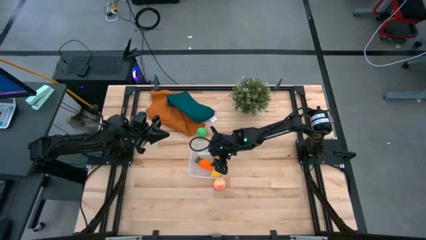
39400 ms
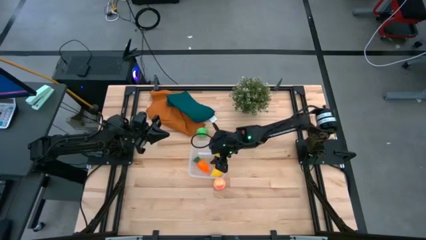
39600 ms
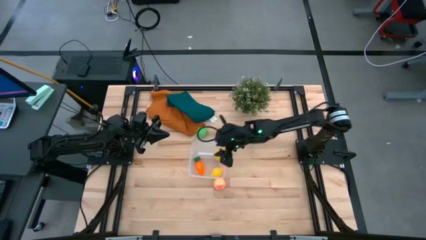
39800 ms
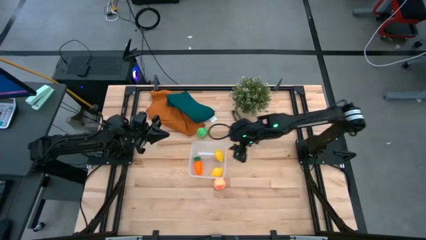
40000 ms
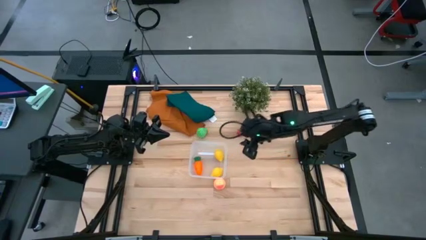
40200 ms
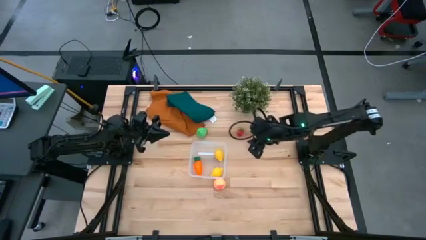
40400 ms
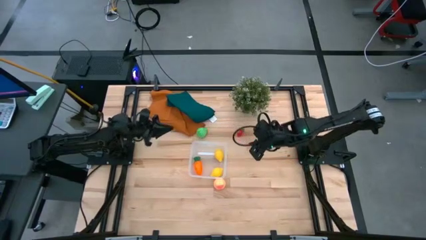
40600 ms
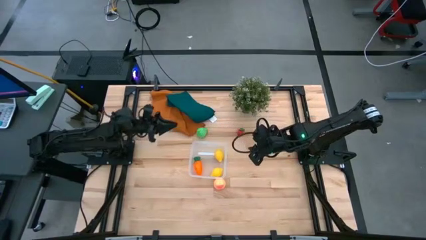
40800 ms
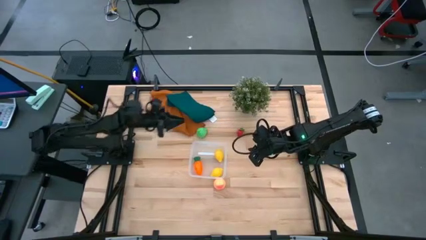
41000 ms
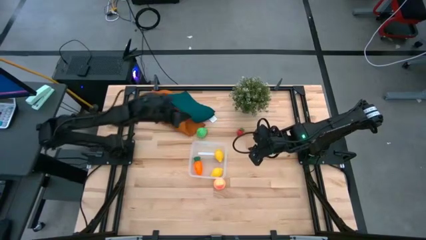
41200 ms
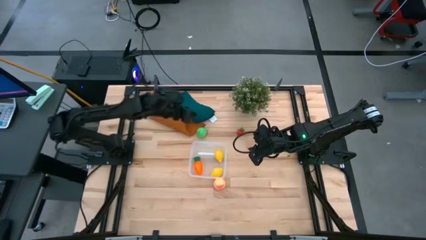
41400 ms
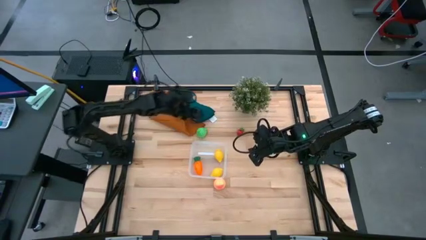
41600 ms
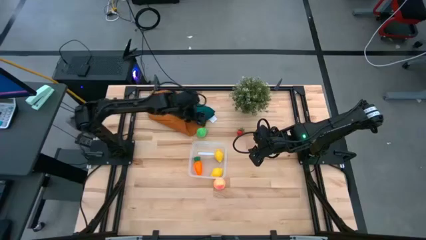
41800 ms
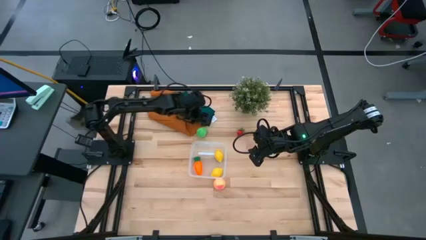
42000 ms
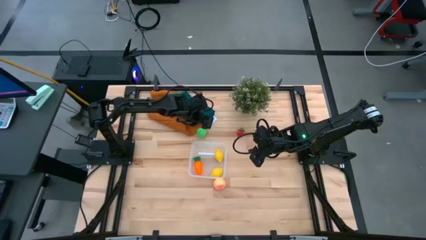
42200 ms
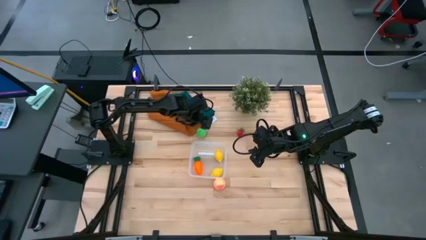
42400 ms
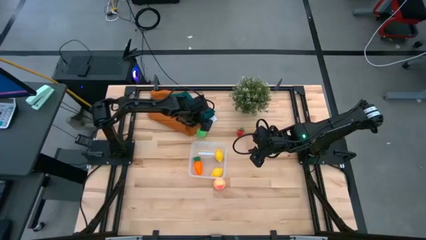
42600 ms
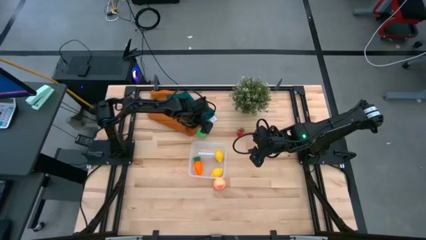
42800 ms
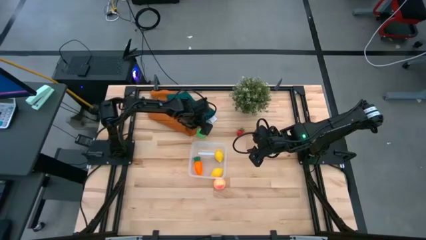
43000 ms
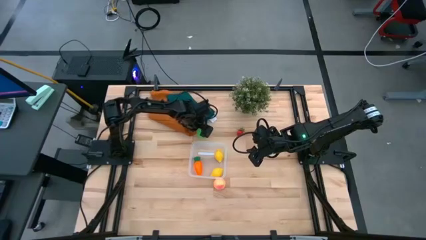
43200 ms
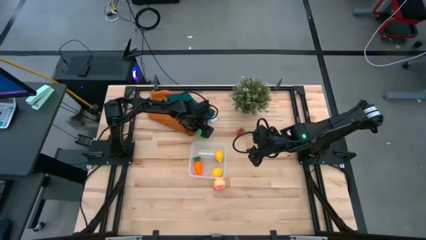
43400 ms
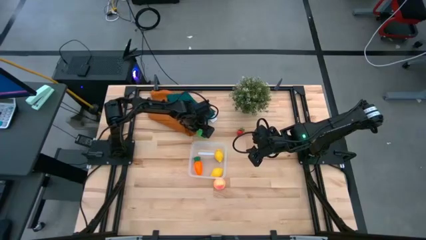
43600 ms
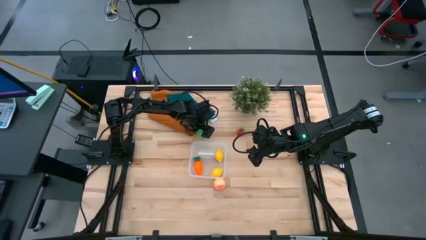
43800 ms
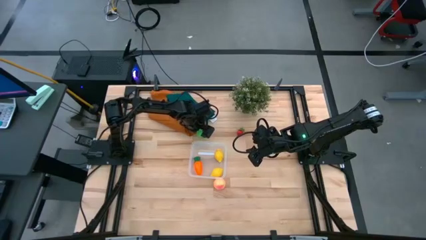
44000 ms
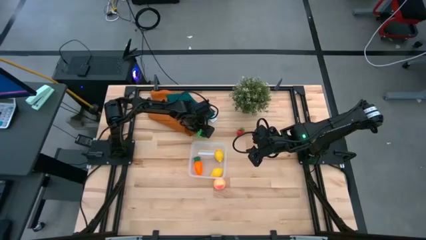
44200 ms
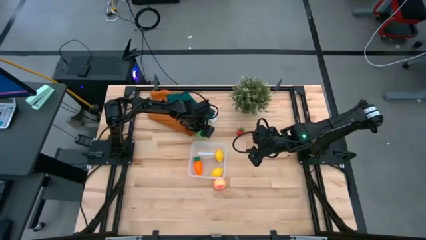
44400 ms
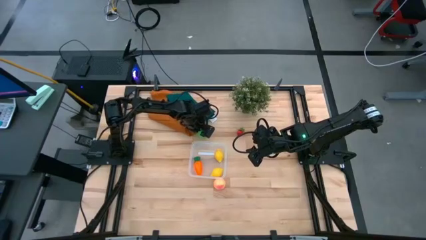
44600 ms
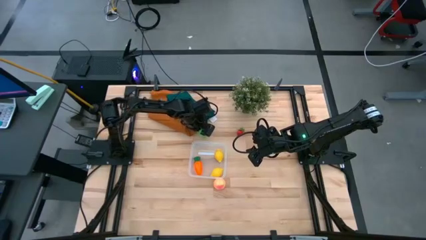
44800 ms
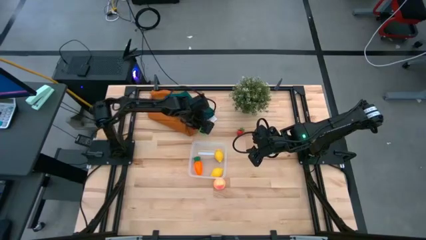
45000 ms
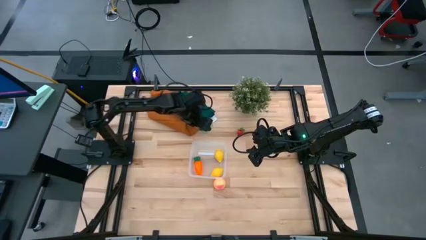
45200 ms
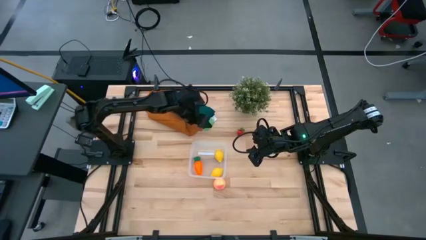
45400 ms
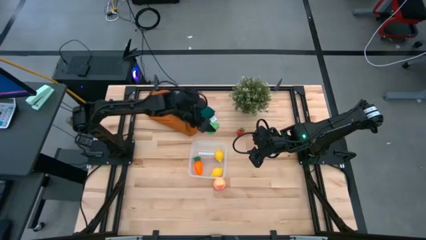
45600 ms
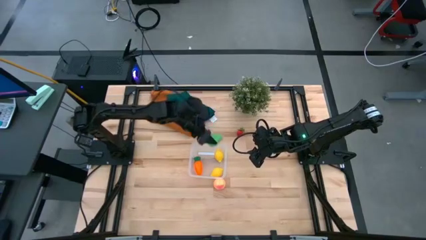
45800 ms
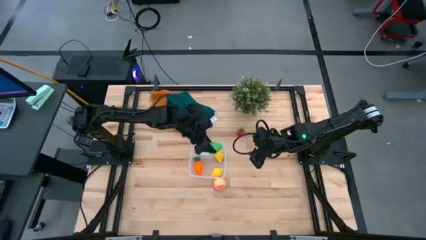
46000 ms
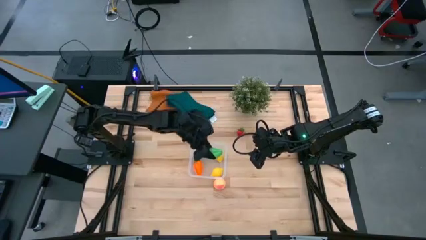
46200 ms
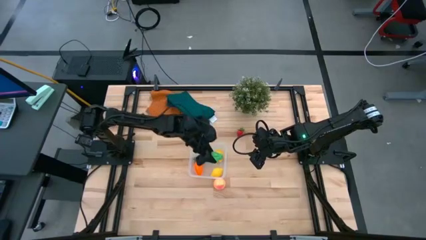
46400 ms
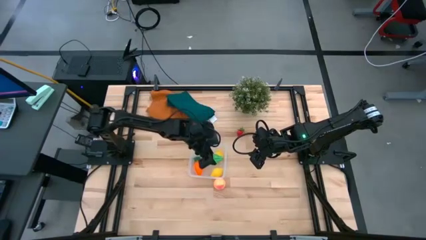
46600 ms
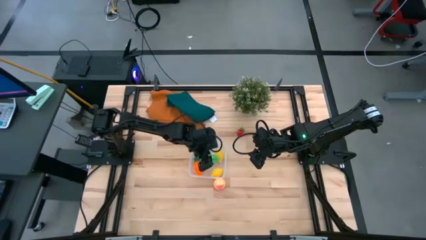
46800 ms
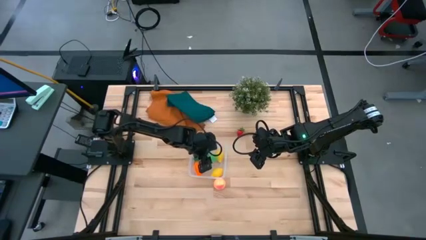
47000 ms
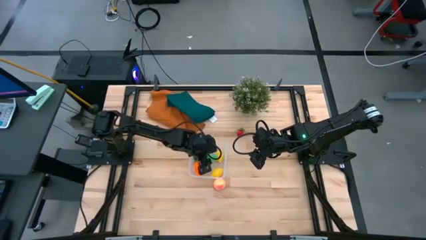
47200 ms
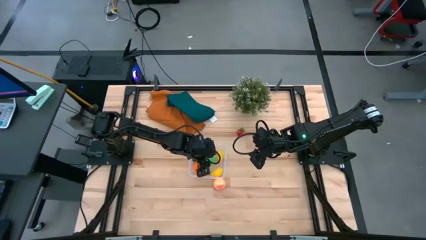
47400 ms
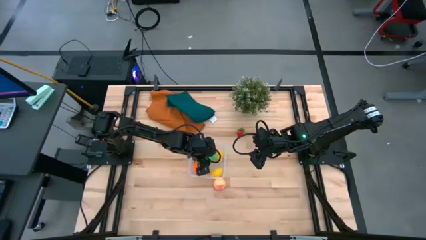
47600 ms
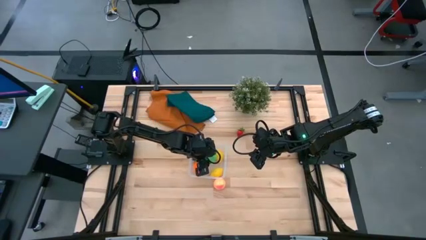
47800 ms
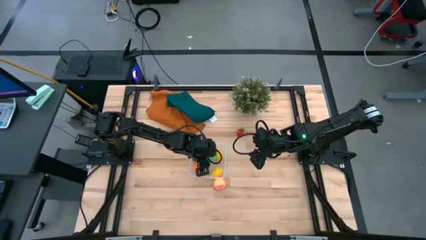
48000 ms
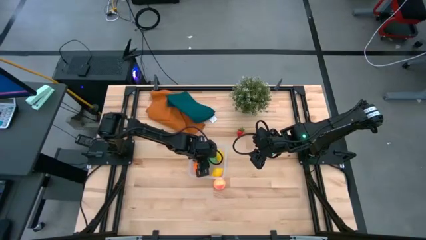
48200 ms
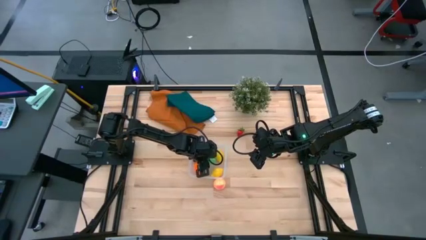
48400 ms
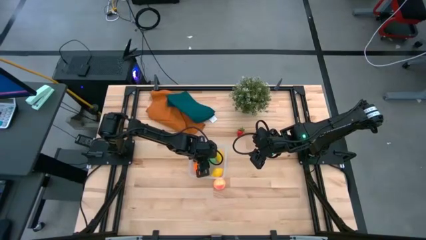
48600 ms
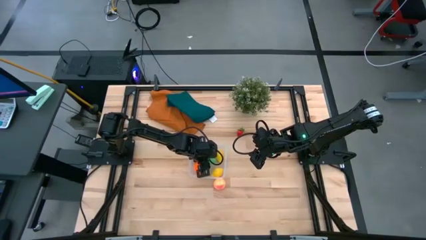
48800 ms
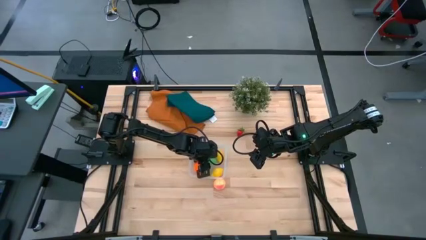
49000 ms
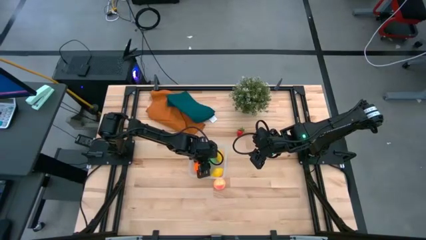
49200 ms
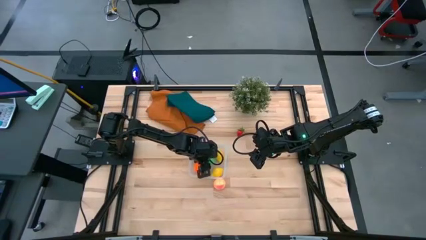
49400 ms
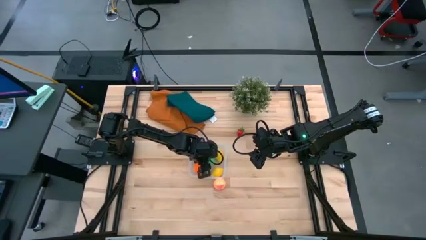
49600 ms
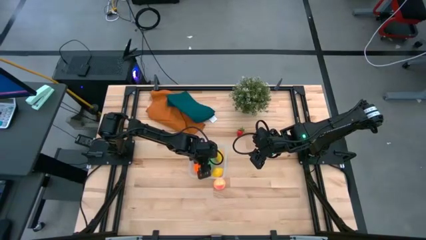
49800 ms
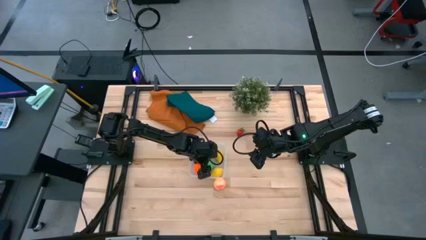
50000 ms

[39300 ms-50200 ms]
Task: Pick and placing Produce into tupperware
Put the green pear into the transparent container

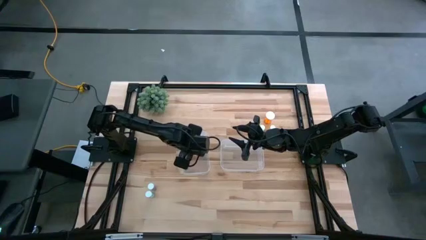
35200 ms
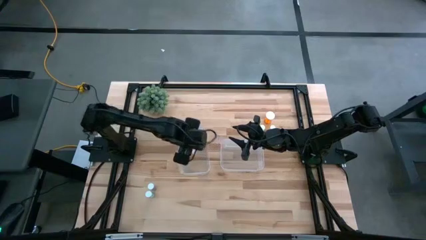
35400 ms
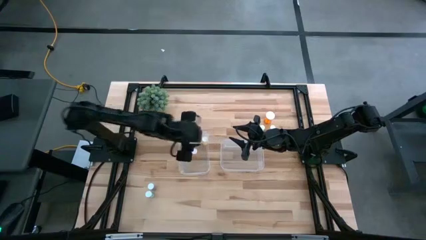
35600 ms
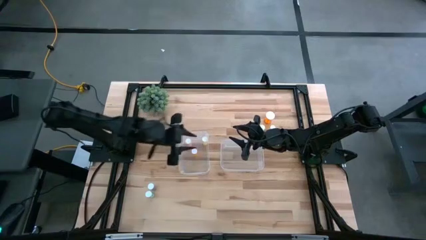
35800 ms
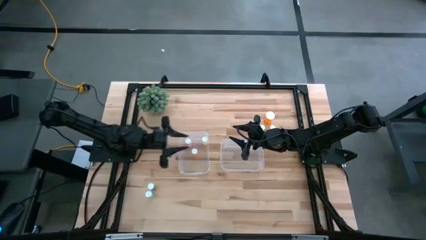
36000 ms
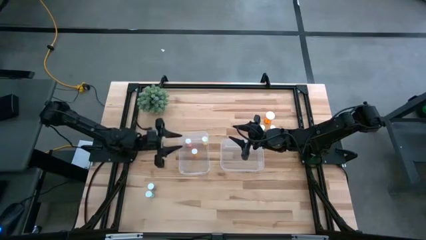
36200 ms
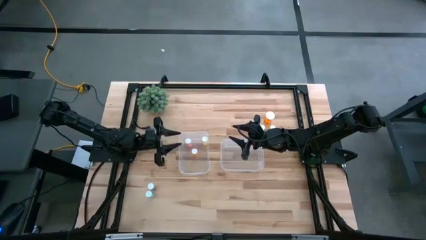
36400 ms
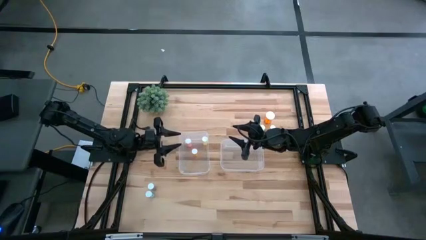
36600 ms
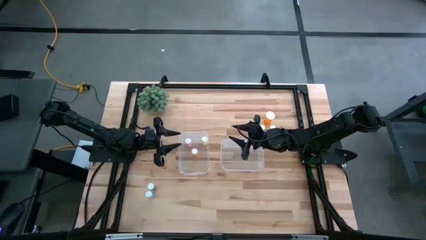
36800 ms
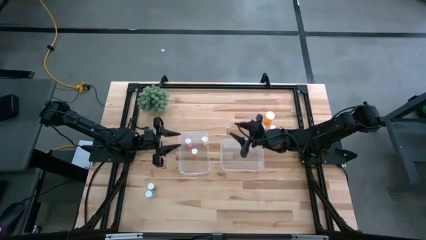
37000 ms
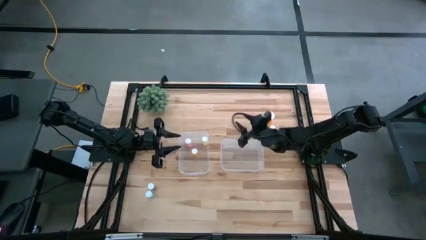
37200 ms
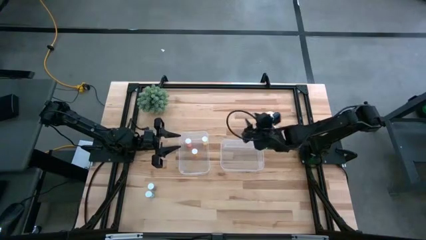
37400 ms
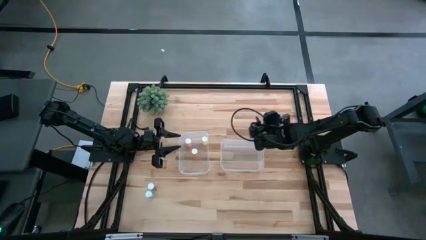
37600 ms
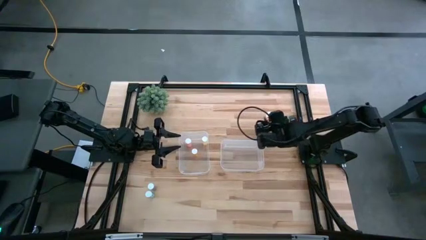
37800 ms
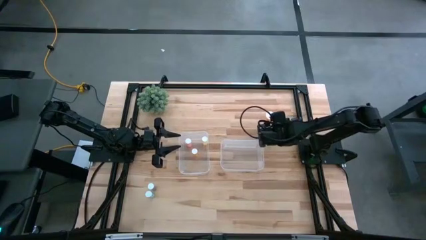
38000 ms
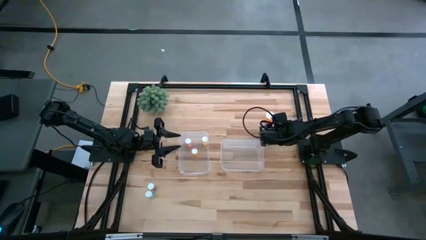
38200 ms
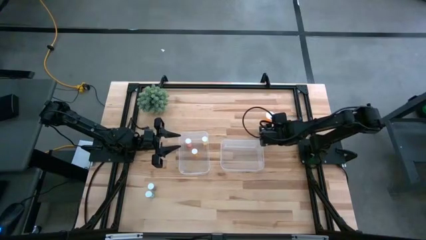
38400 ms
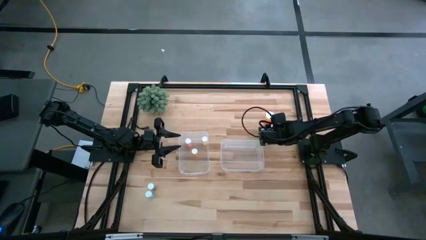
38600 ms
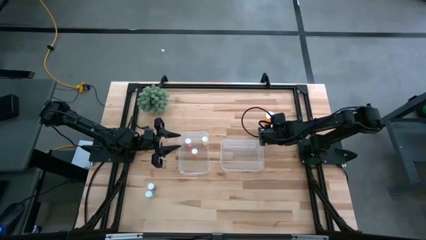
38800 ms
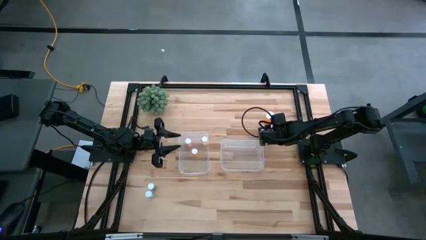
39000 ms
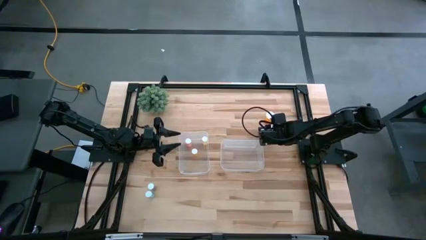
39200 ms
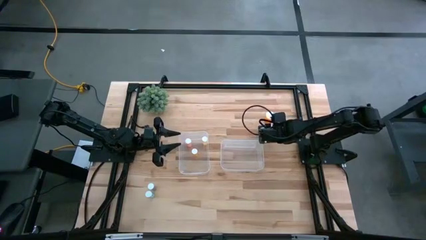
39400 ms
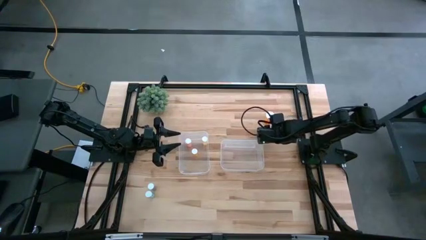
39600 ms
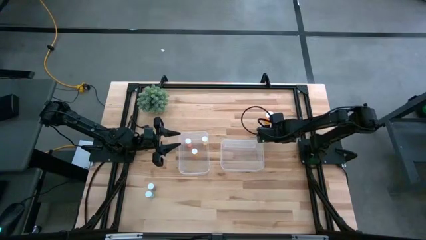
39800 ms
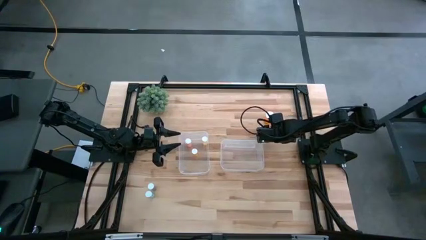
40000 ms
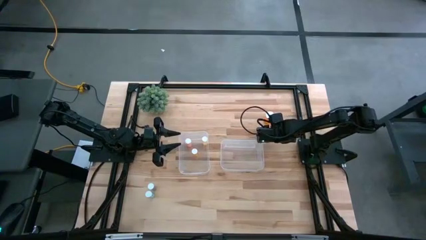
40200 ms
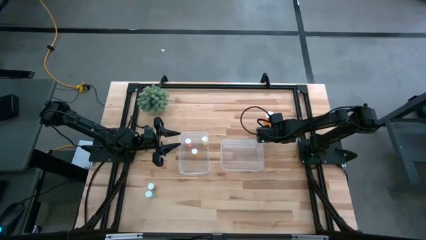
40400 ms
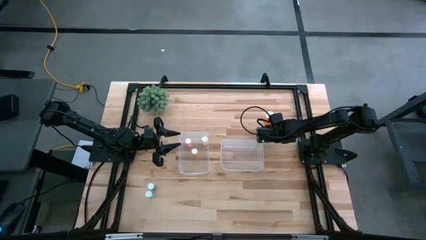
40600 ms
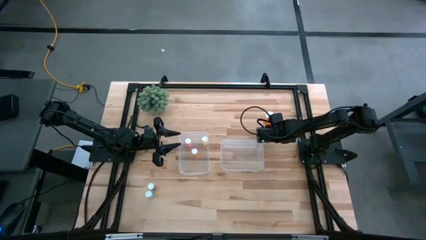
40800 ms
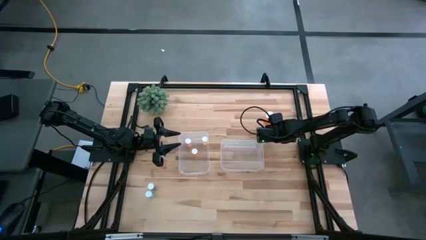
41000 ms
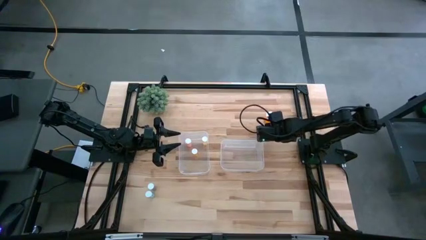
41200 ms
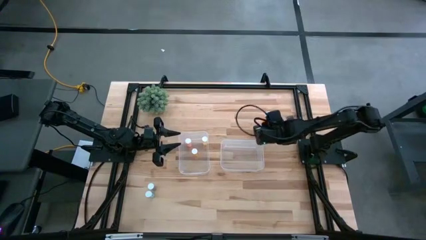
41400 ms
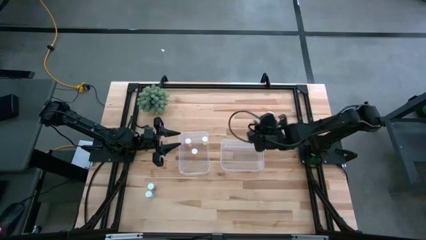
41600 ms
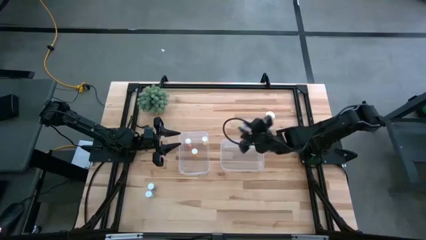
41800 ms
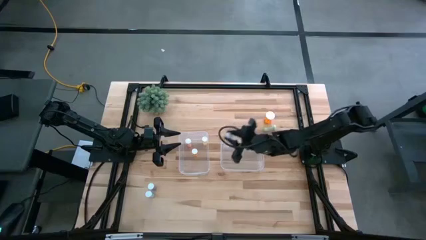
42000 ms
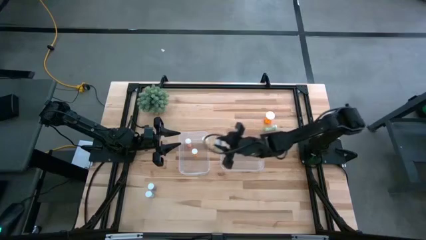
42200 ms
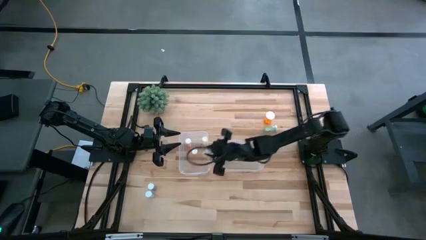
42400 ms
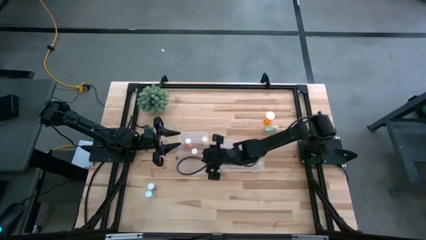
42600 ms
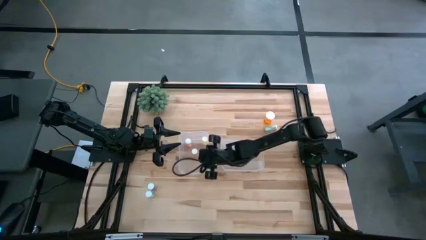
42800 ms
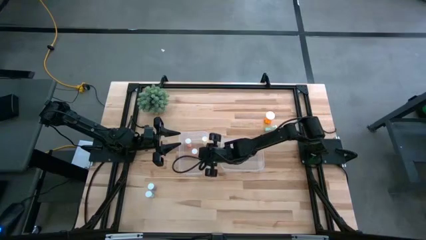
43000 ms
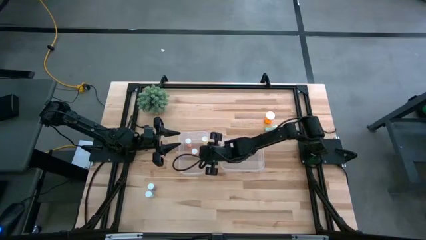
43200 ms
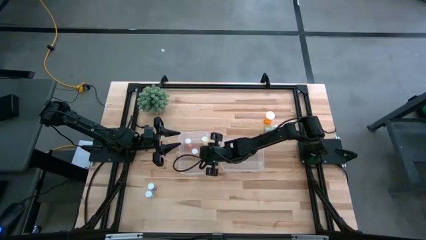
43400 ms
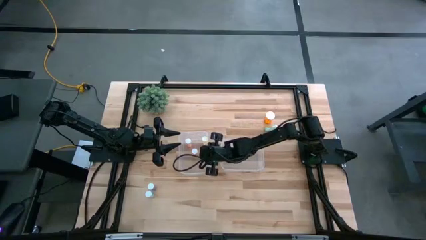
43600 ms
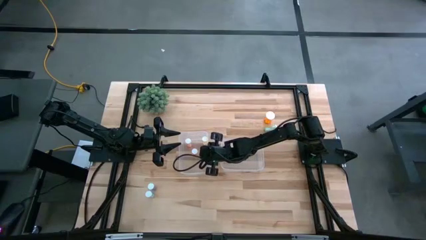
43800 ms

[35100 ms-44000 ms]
Task: Pick and place medicine bottles into bin by pill shape (circle, oval)
Put the yellow tablet bottle into the left transparent bin
